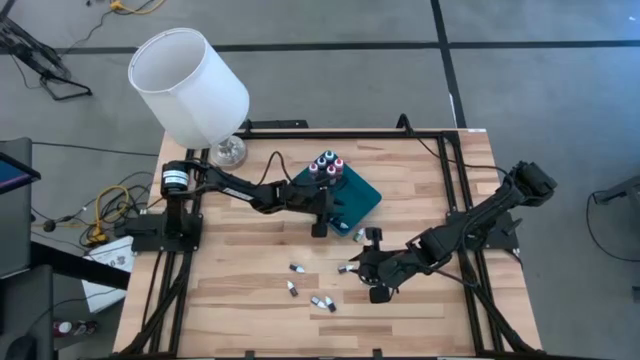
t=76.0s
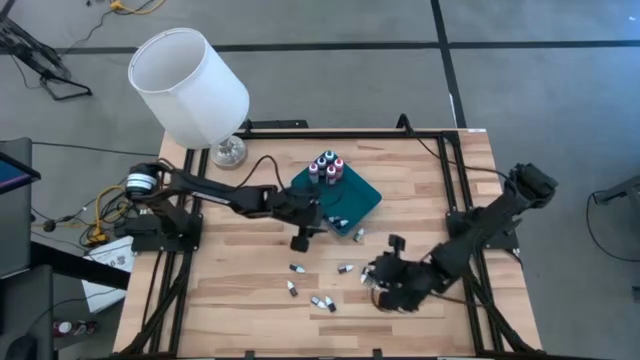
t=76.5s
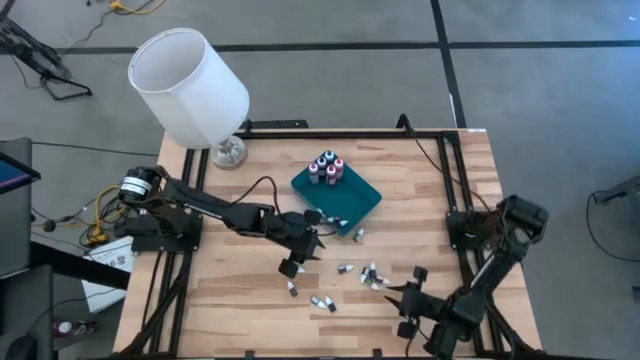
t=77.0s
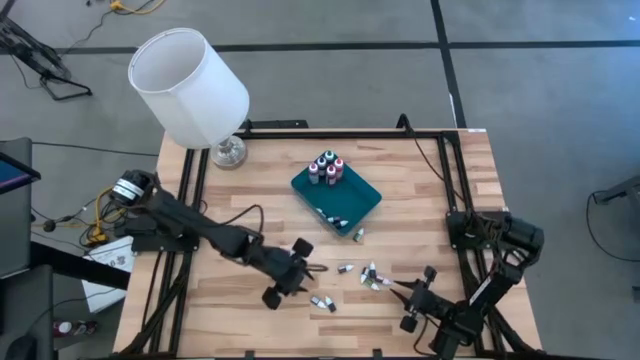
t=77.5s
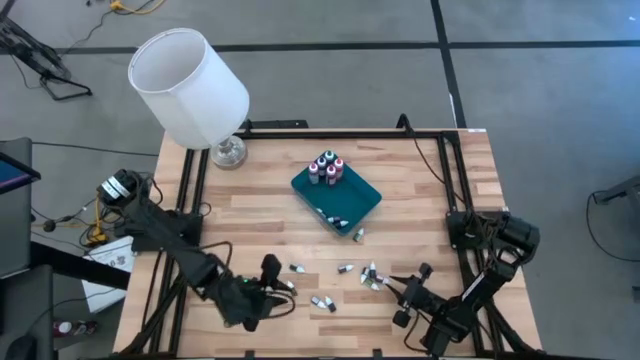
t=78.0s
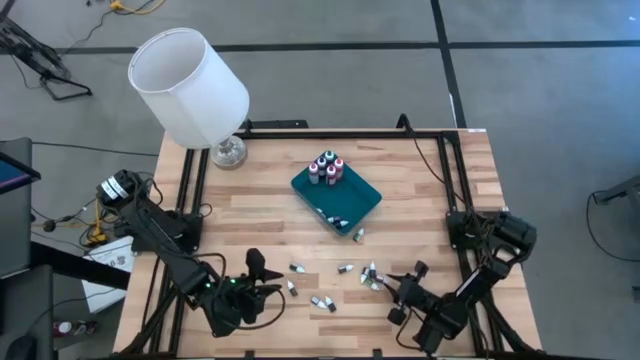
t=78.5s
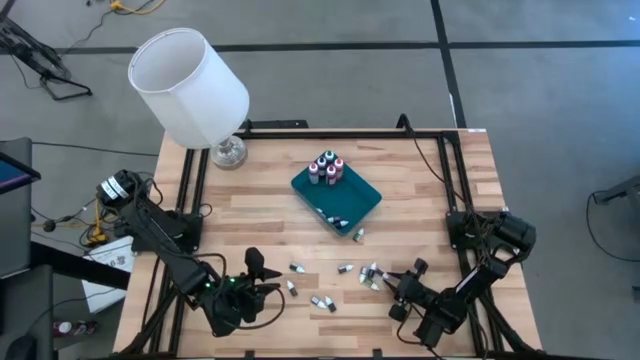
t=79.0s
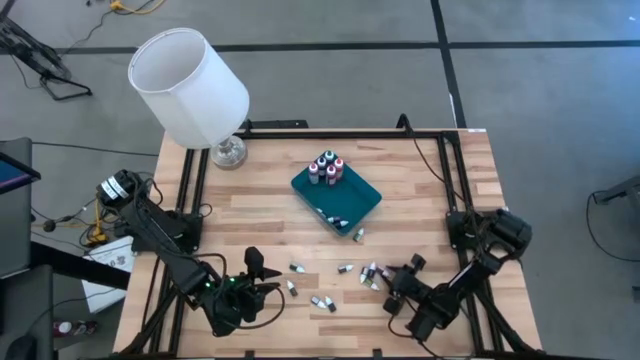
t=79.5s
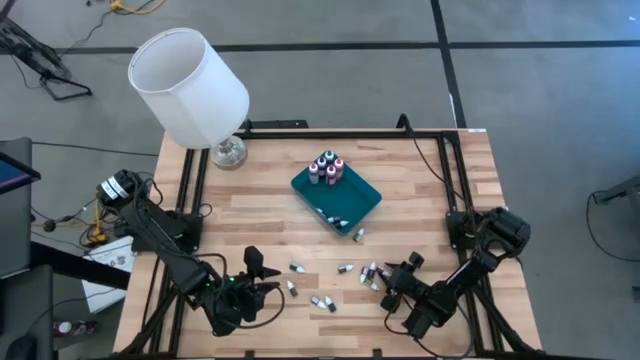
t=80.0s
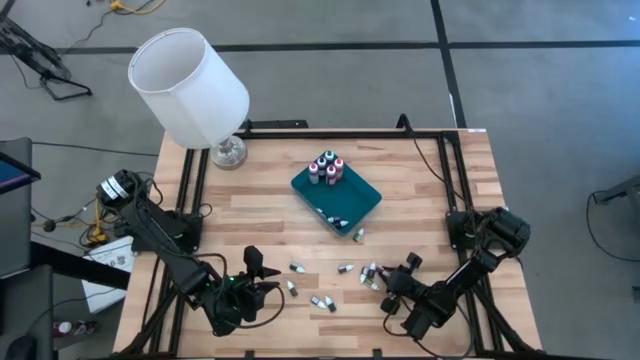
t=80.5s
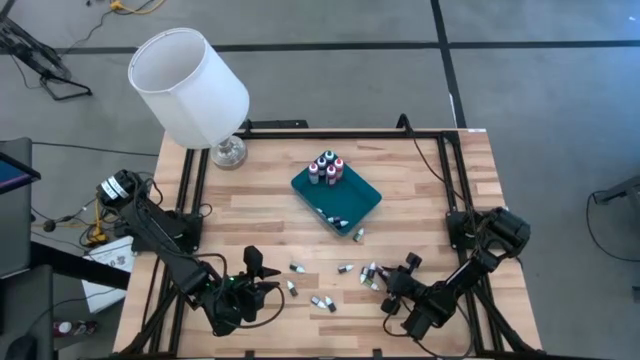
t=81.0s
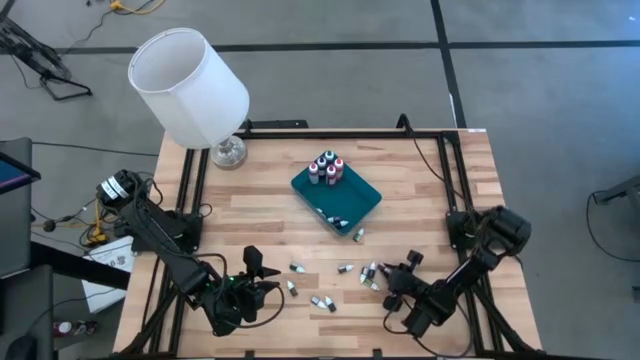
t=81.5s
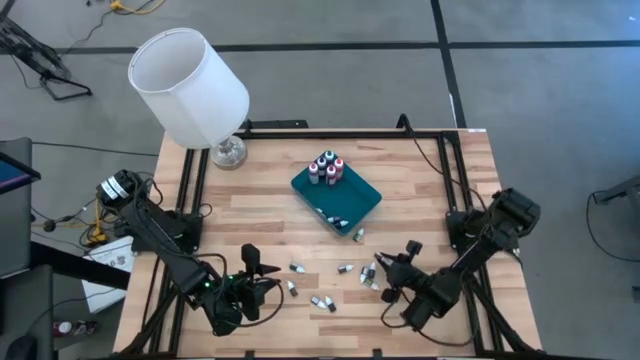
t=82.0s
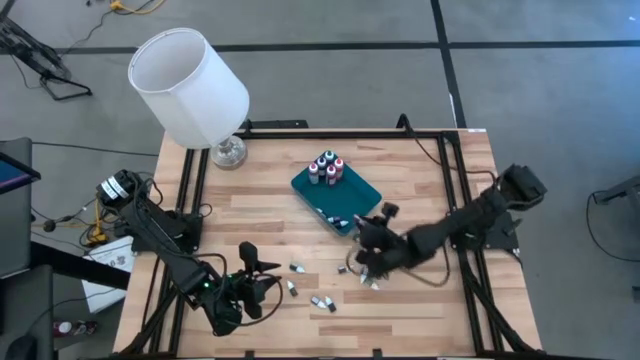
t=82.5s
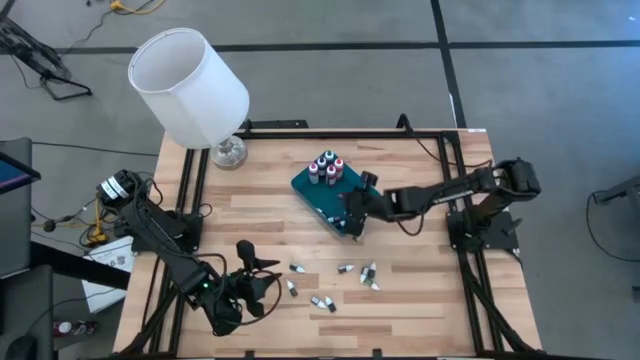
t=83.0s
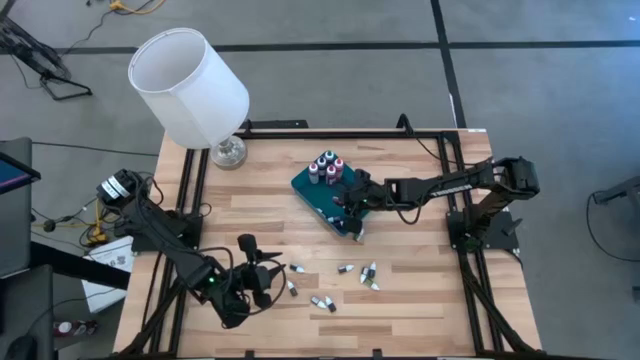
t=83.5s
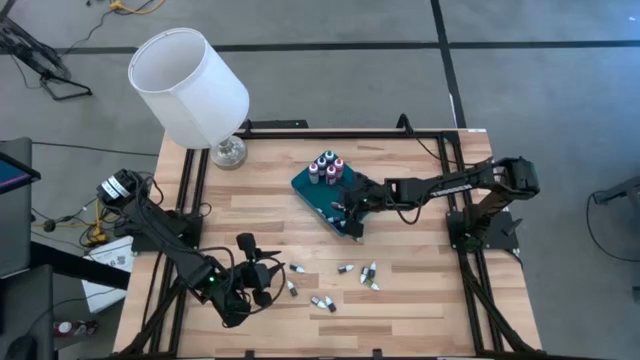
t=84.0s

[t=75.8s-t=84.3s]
Task: Pick & Place food coloring
Put the small red food coloring bottle into the blue bin

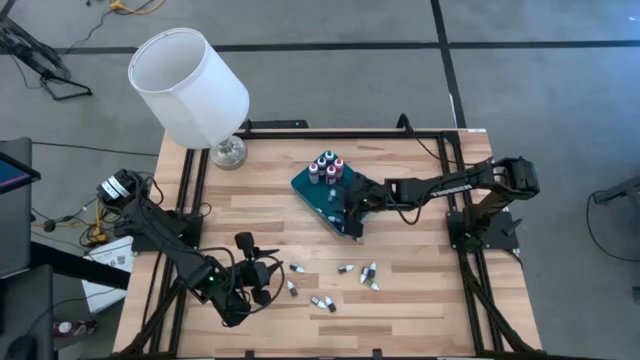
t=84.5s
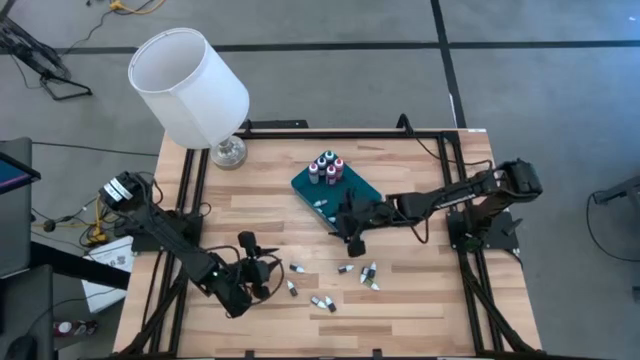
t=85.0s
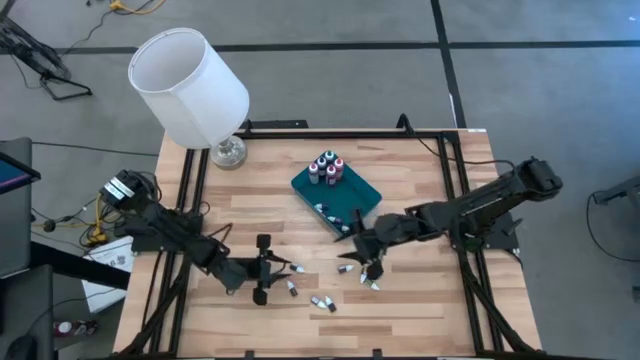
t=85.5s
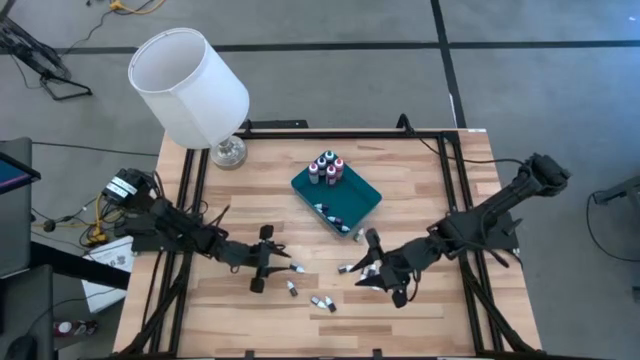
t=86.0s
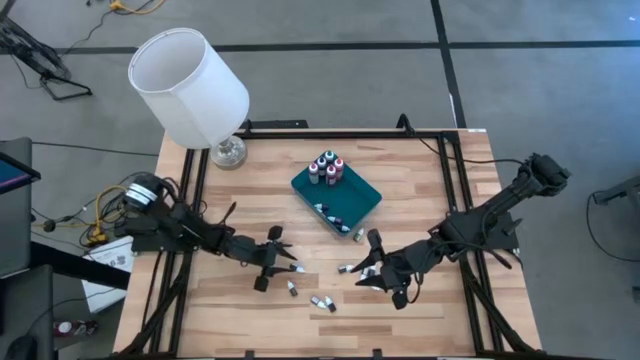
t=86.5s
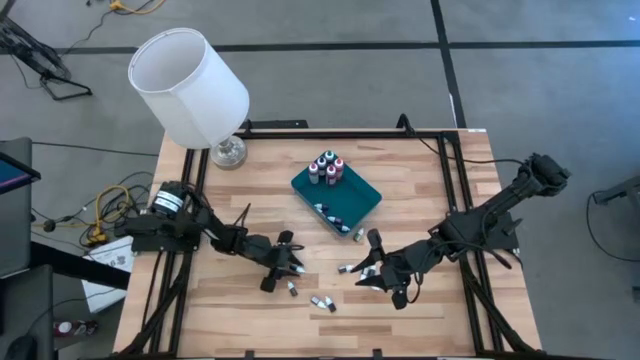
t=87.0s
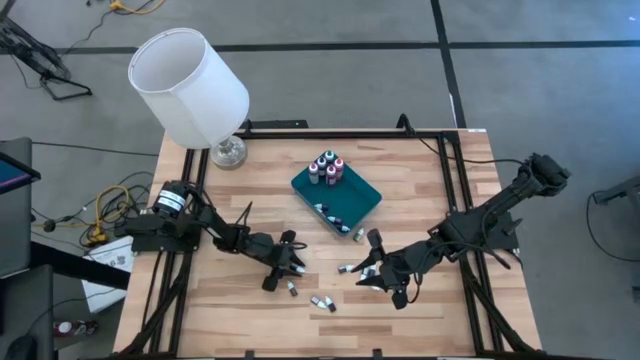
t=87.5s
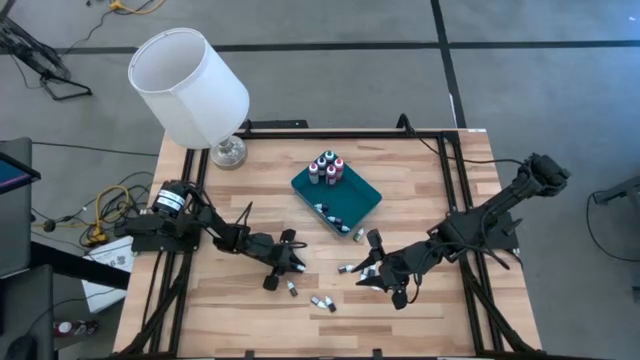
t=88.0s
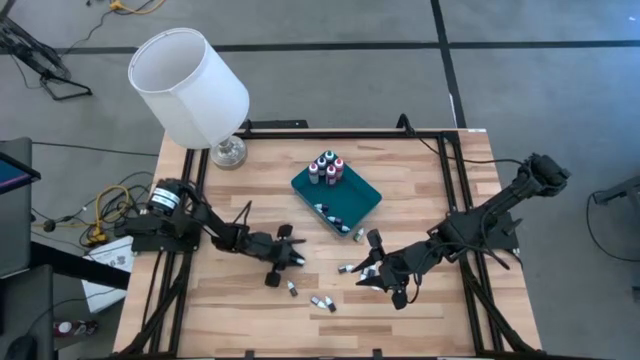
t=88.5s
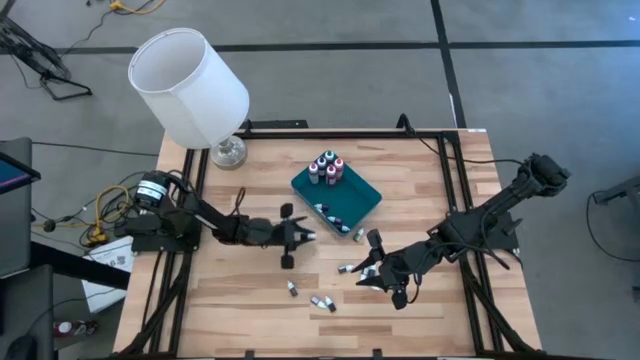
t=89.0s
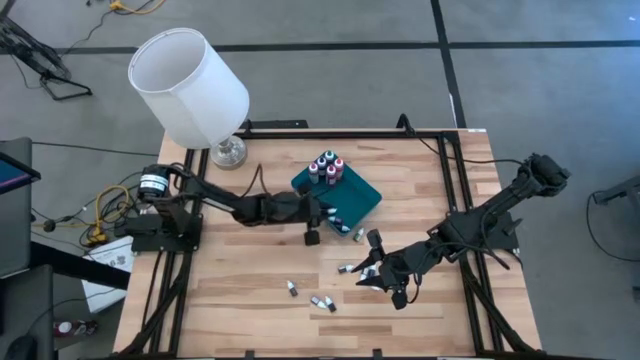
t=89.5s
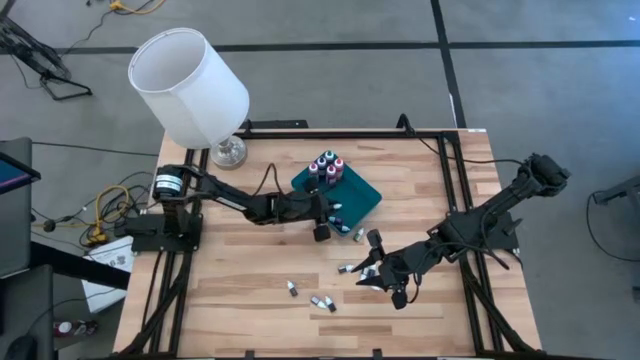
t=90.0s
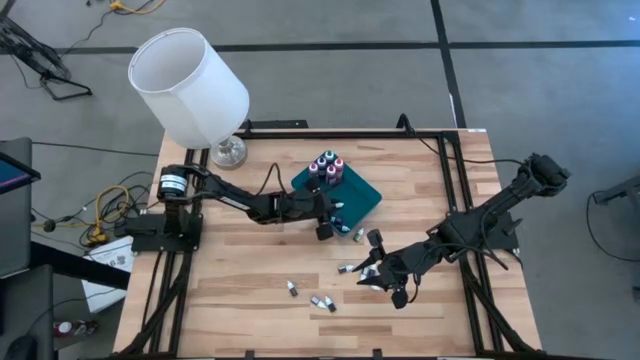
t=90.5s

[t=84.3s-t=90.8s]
Put the small blue food coloring bottle into the blue bin

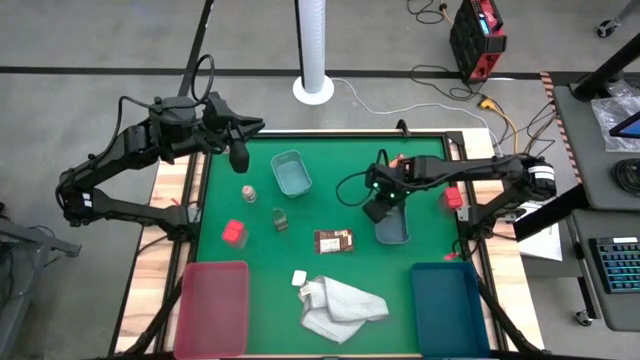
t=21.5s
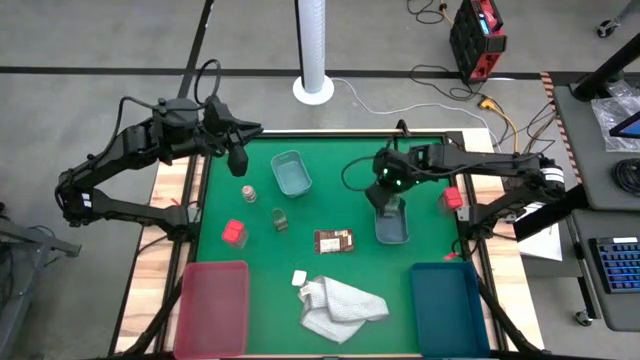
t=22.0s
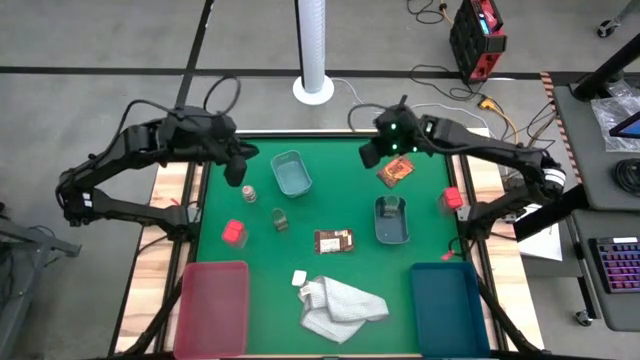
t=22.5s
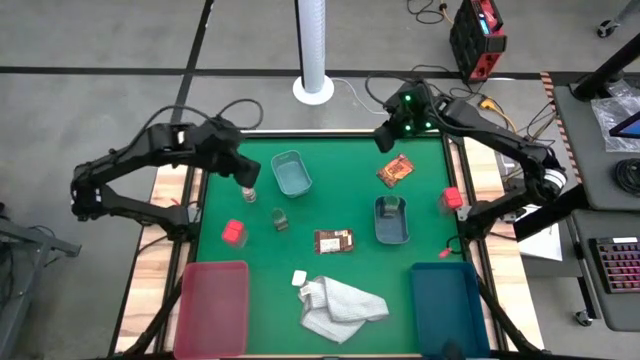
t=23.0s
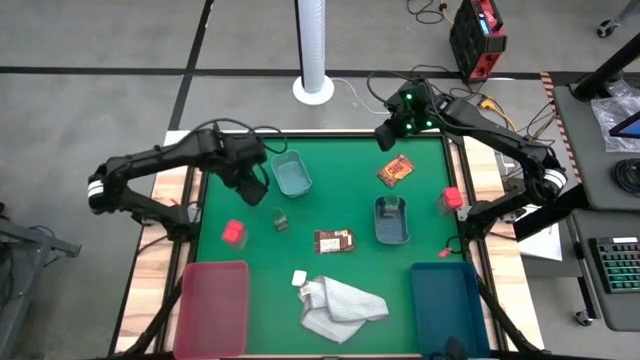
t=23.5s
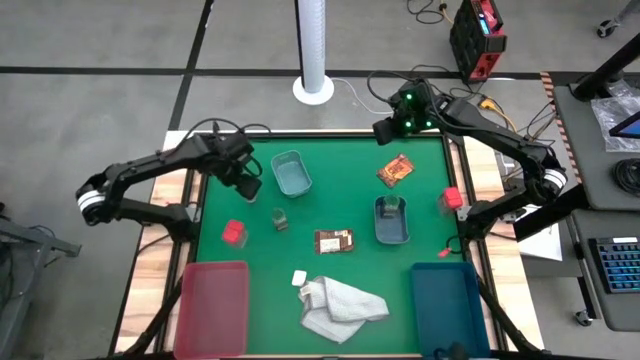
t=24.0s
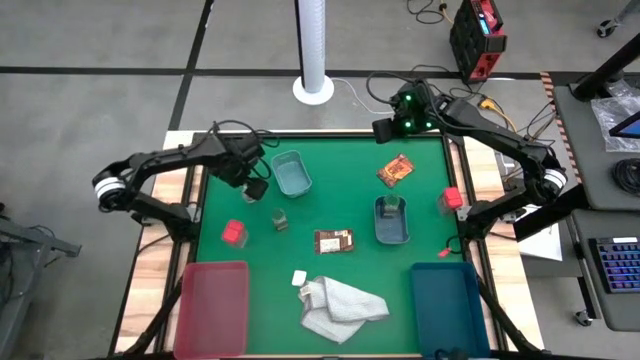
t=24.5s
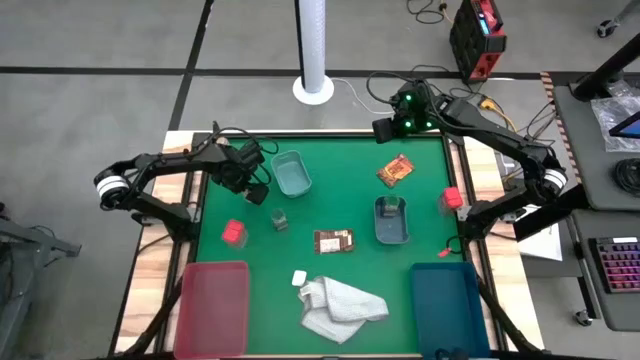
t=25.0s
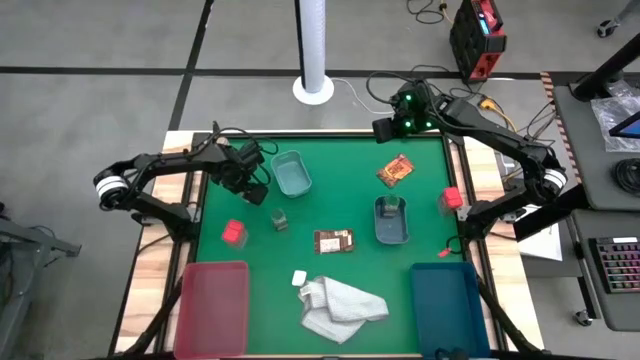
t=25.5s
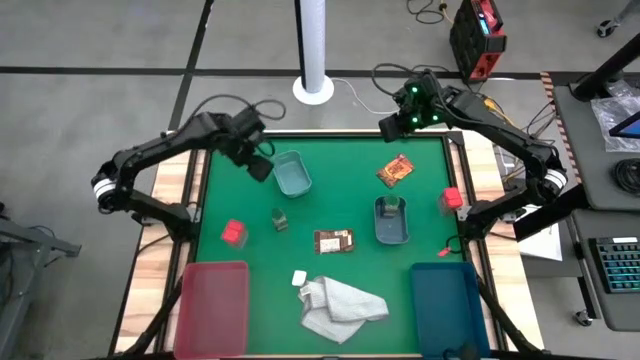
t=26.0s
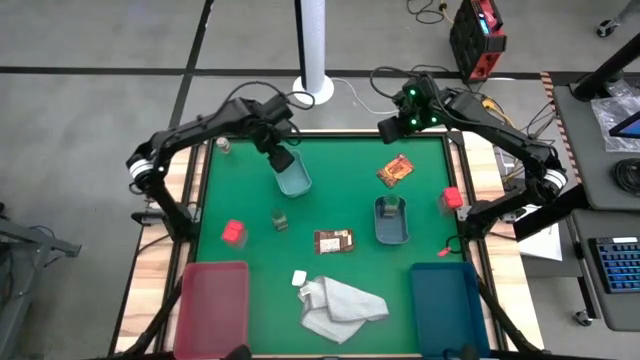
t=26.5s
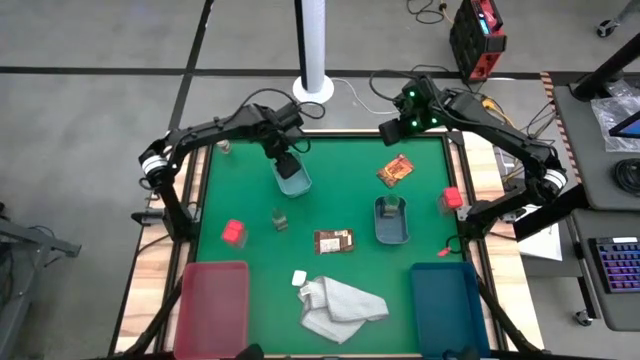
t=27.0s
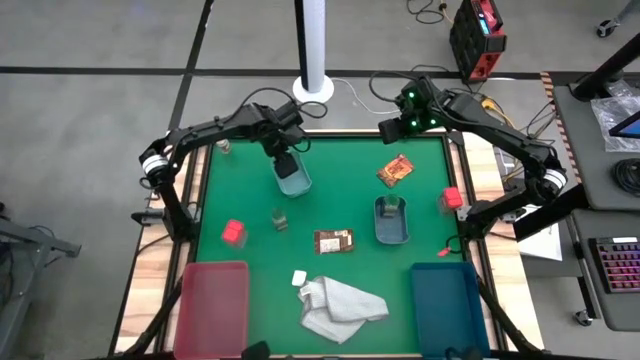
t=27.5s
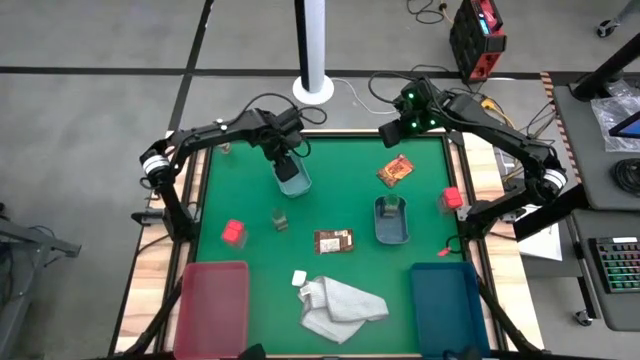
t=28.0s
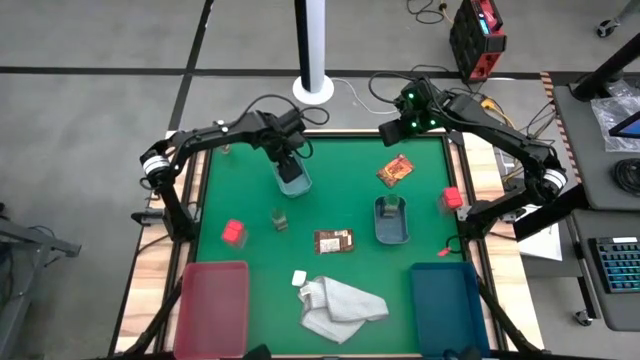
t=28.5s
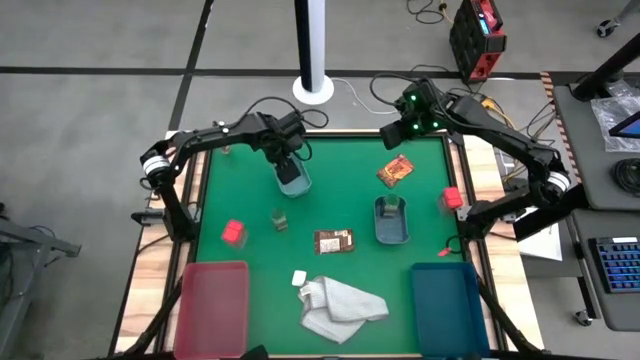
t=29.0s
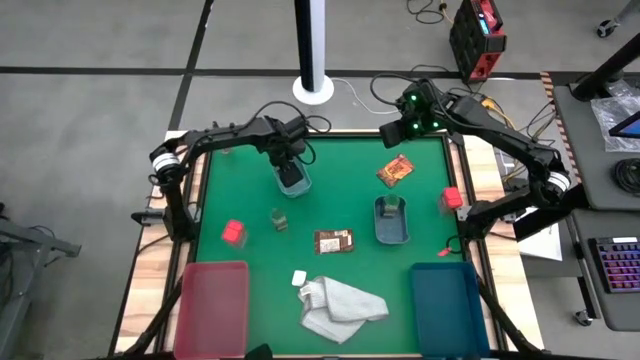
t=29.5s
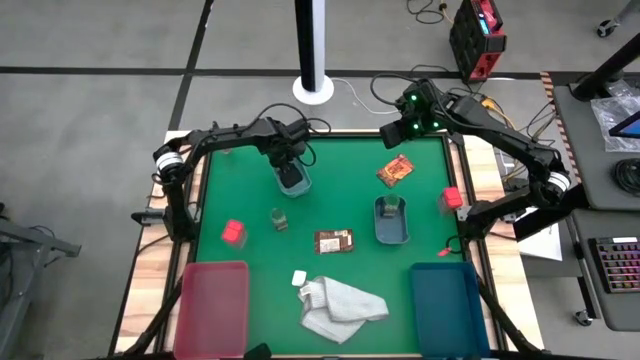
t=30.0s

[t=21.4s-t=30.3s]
Task: Sort spices by type
Put the bottom brown spice bottle into the green bin
